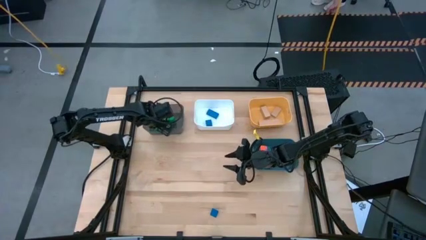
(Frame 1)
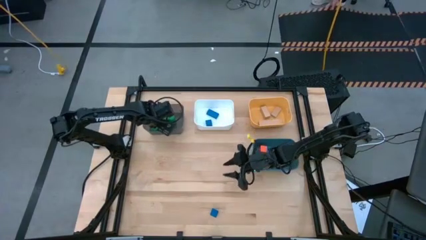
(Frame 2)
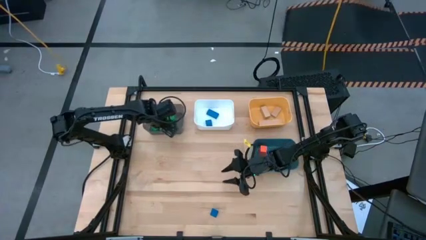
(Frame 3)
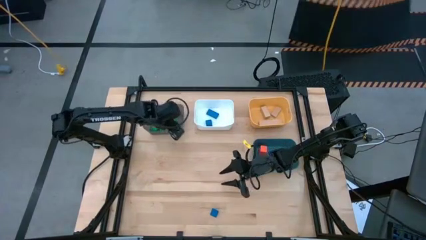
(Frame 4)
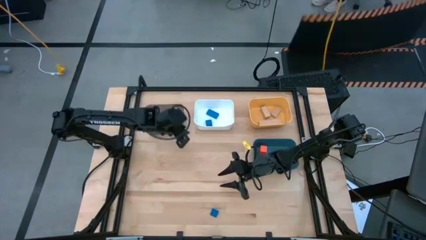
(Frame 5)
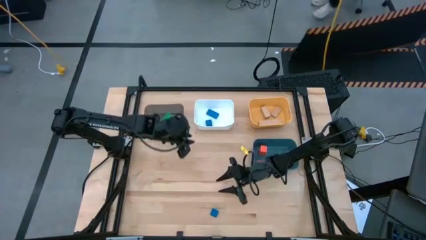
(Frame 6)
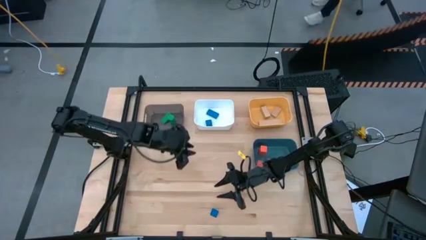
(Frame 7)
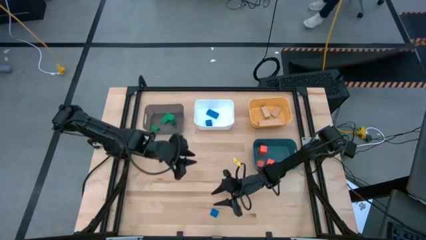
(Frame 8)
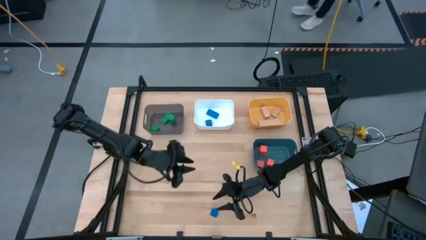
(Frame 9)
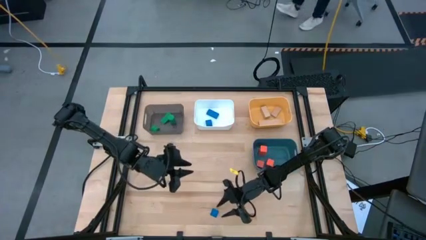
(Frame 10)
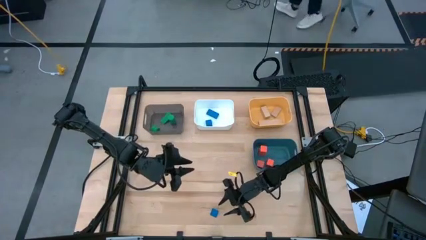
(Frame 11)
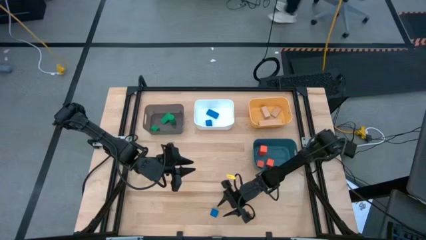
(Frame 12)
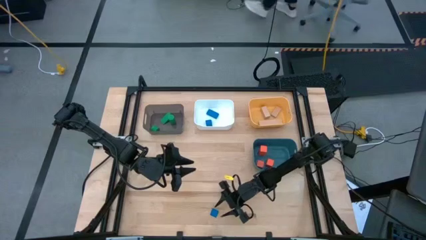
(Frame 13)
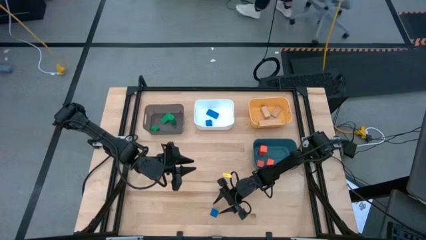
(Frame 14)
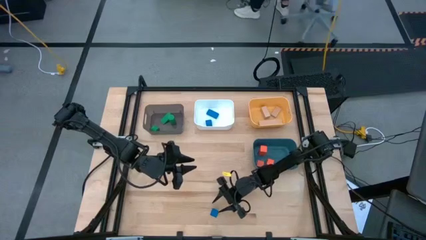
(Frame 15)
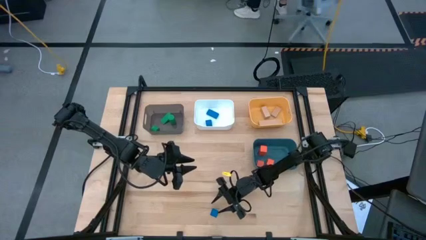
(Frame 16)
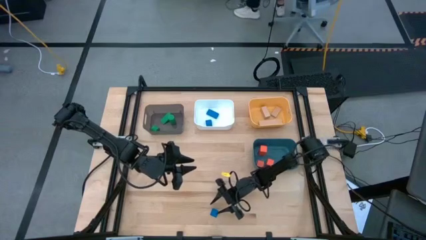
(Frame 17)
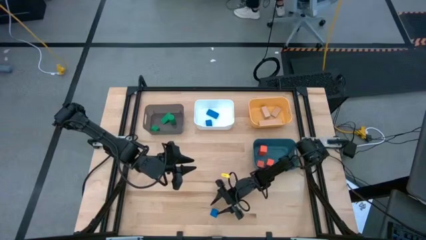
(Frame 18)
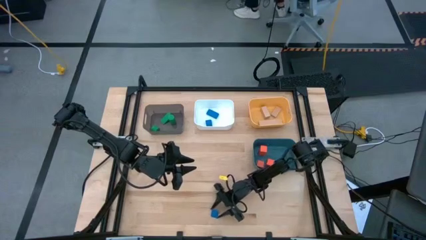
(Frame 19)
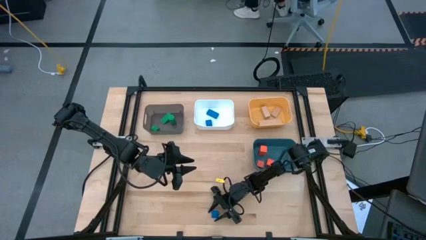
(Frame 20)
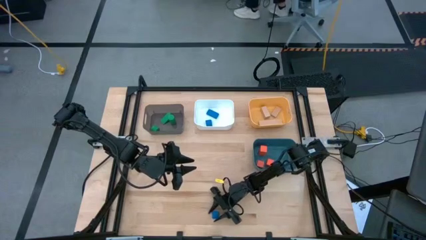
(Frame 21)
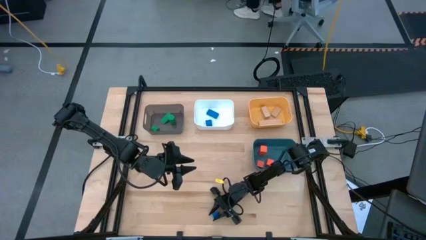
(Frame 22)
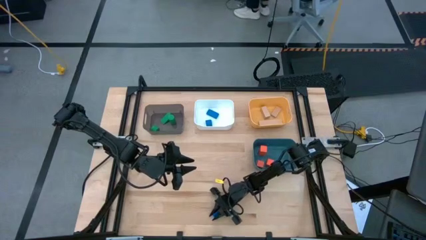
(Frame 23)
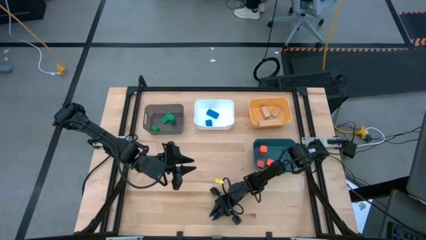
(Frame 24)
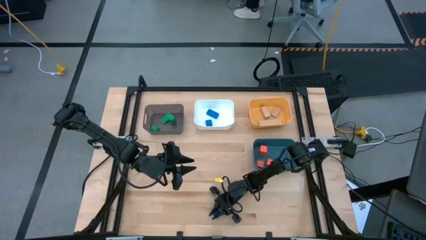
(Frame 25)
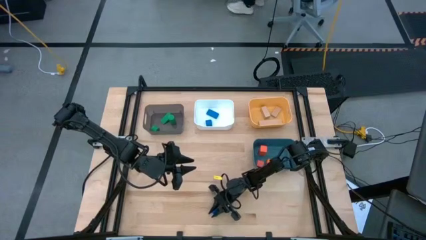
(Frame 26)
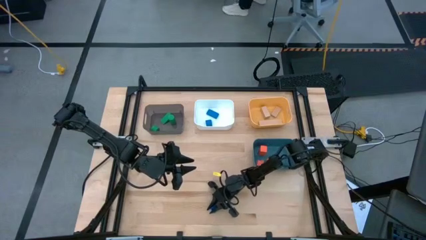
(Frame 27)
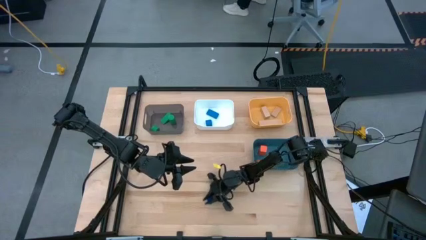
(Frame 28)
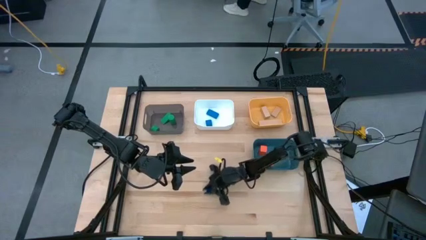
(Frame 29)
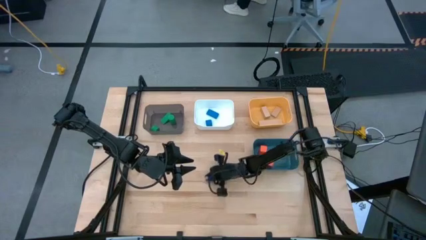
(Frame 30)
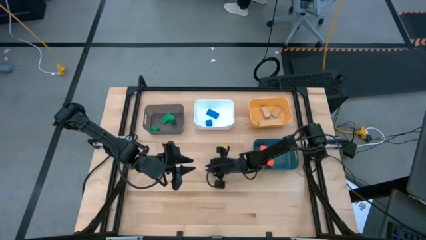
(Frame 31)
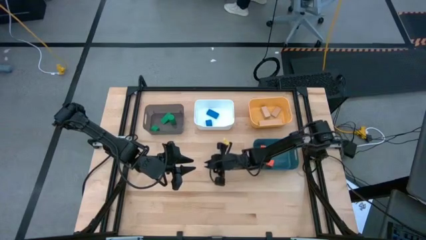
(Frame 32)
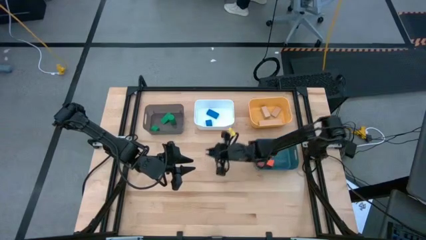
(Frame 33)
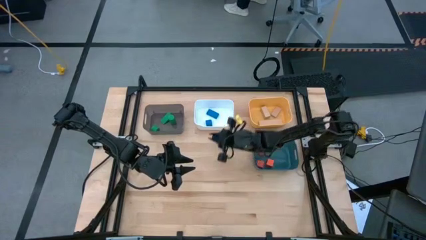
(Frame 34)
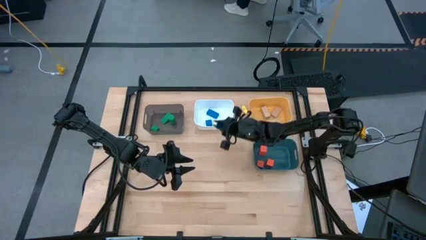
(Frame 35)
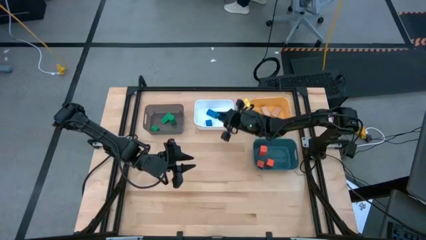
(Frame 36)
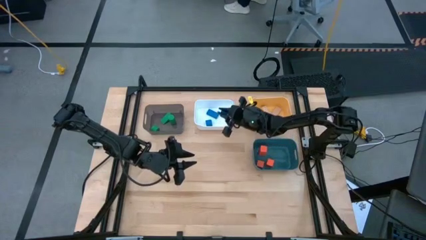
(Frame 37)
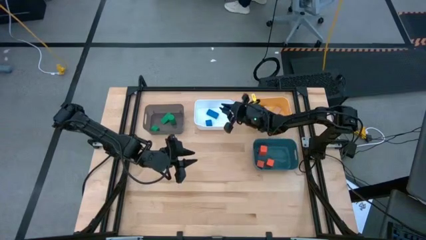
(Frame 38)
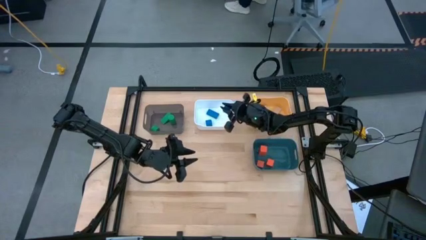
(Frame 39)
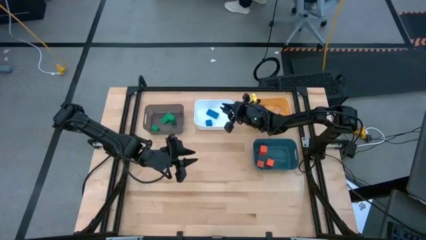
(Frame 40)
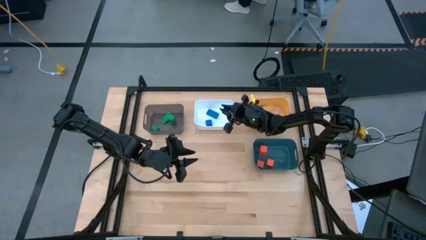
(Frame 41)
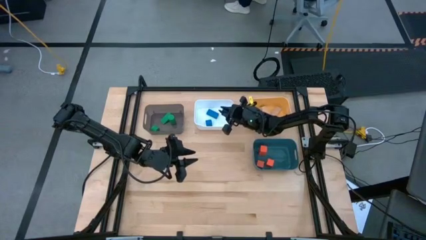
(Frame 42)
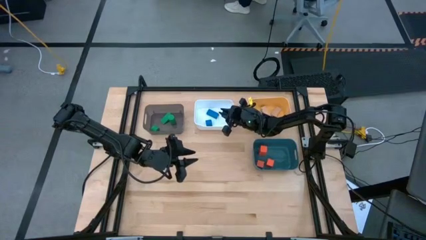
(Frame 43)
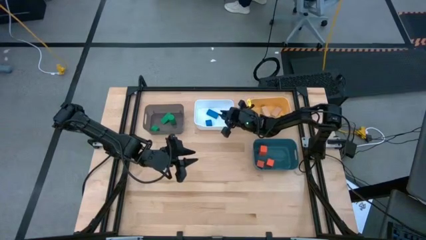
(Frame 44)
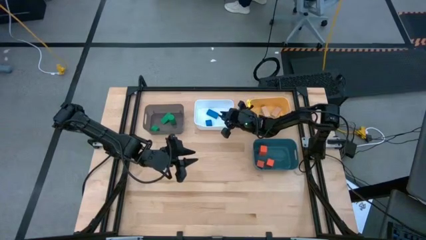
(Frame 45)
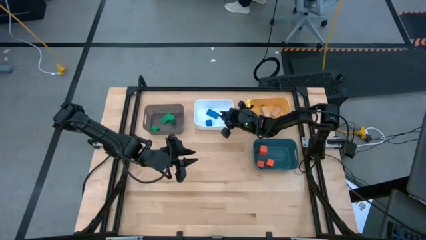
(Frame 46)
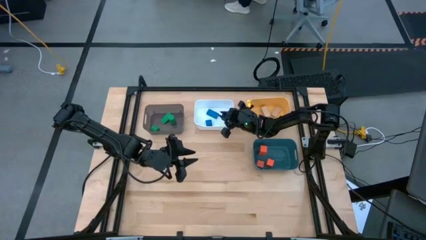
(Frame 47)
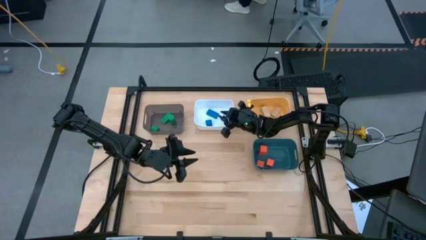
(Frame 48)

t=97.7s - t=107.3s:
Task: Sort & place blocks by color
Put the blue block into the white bin

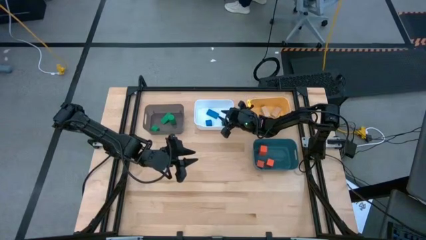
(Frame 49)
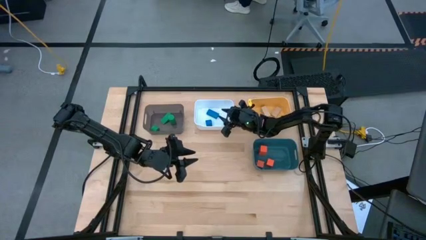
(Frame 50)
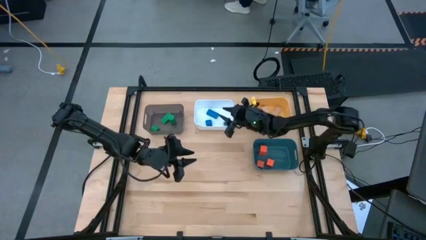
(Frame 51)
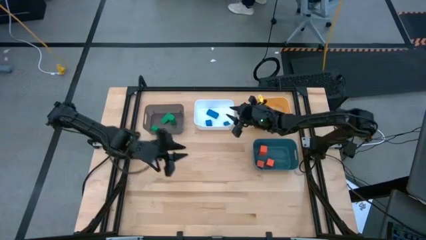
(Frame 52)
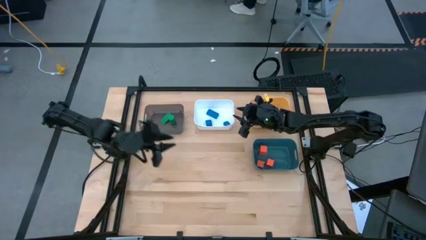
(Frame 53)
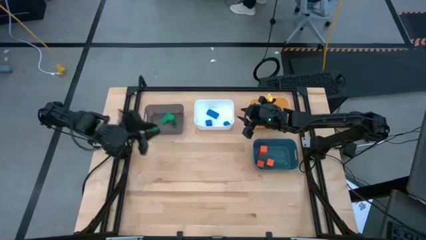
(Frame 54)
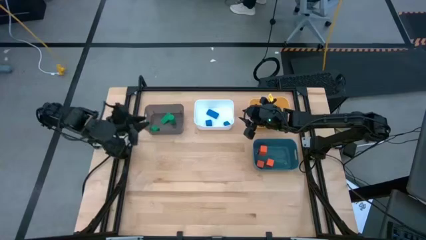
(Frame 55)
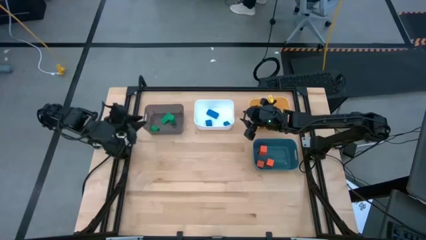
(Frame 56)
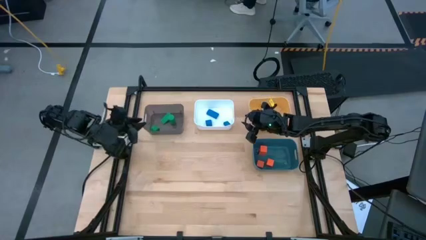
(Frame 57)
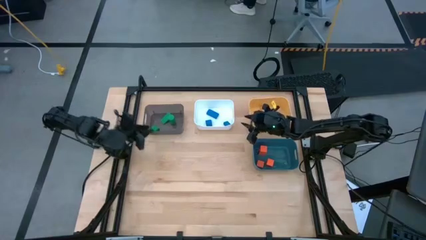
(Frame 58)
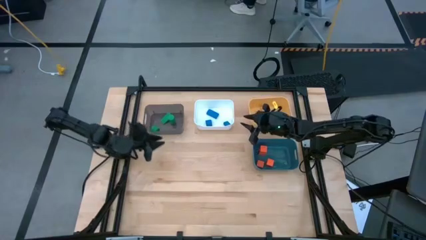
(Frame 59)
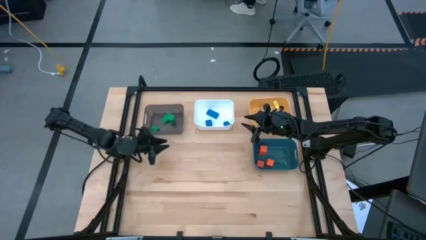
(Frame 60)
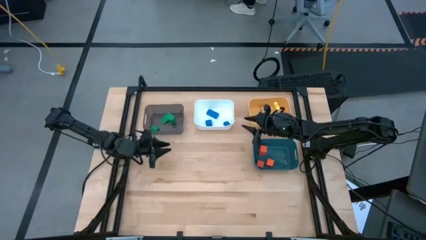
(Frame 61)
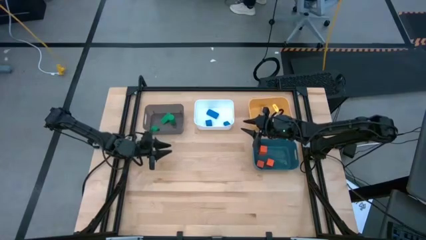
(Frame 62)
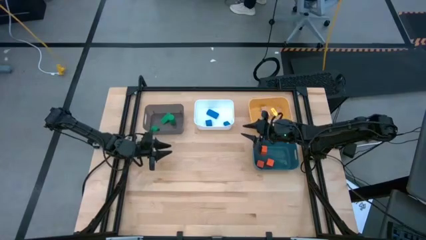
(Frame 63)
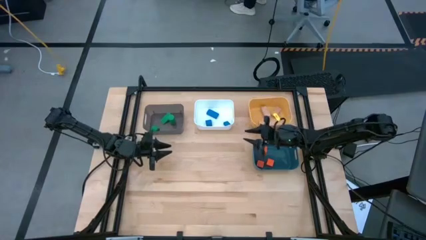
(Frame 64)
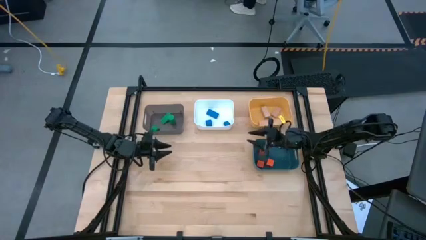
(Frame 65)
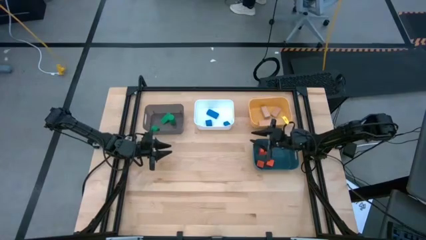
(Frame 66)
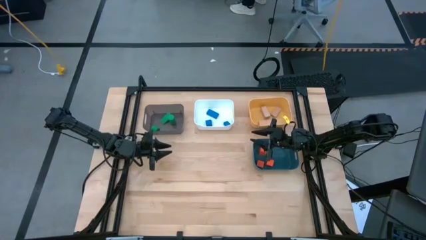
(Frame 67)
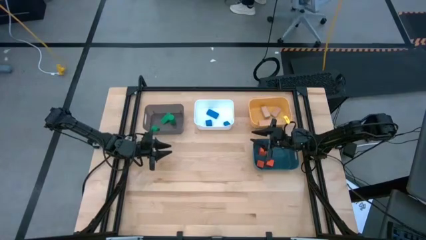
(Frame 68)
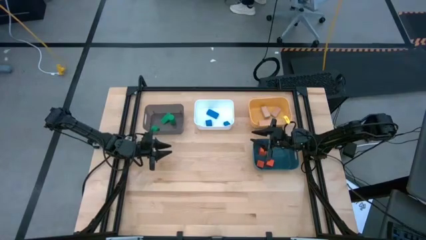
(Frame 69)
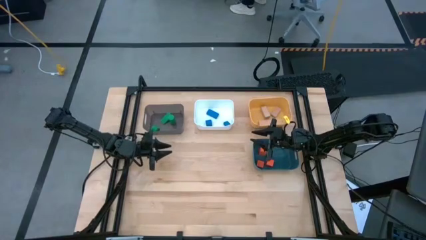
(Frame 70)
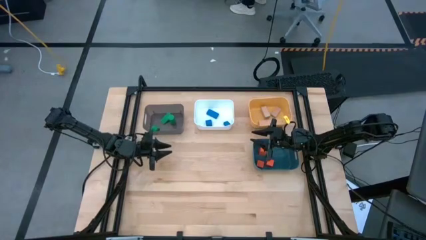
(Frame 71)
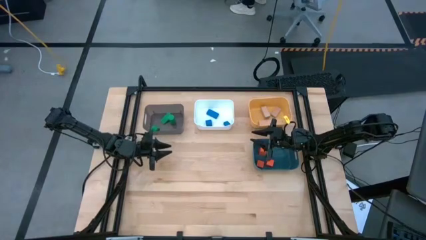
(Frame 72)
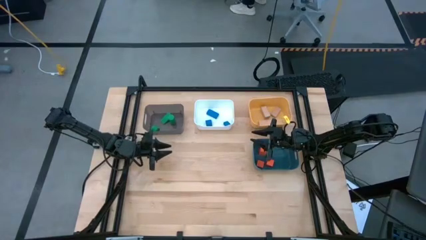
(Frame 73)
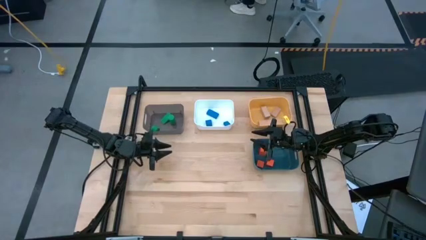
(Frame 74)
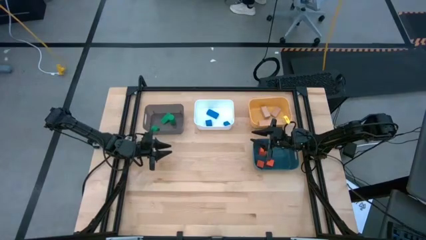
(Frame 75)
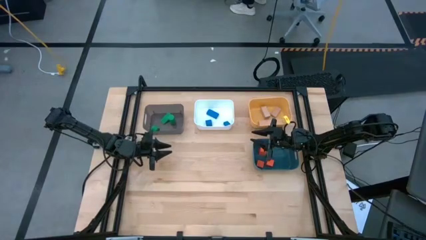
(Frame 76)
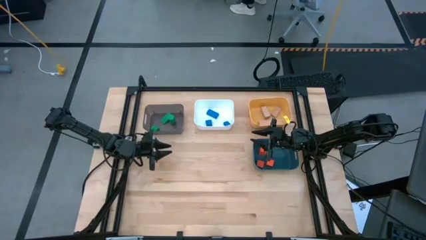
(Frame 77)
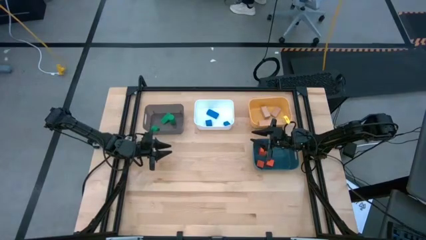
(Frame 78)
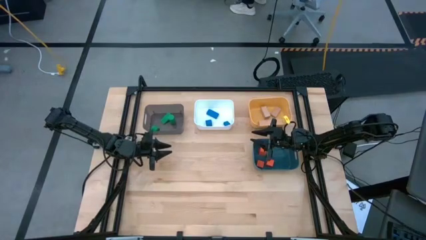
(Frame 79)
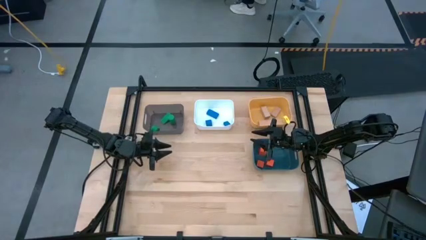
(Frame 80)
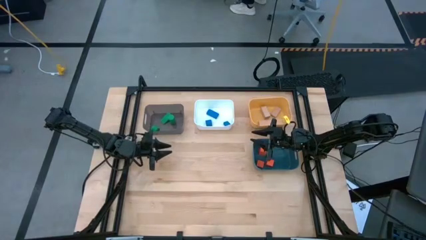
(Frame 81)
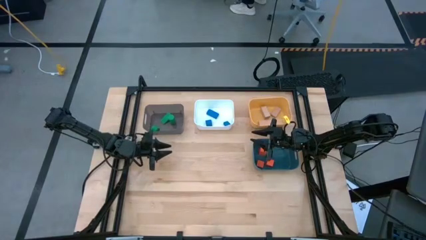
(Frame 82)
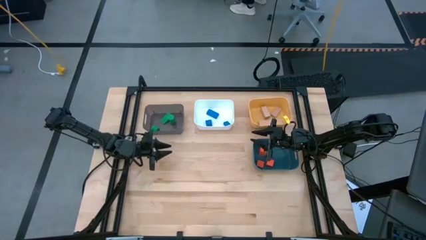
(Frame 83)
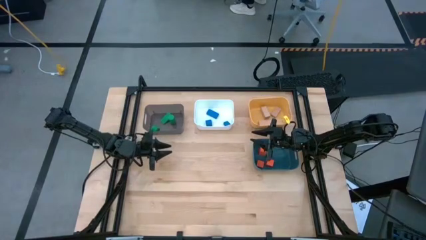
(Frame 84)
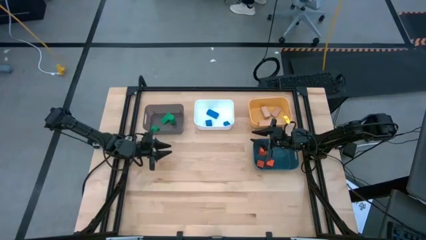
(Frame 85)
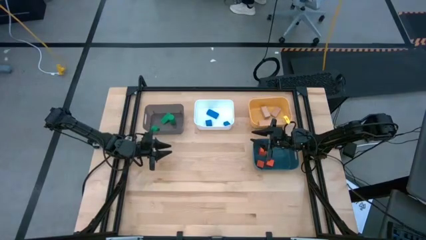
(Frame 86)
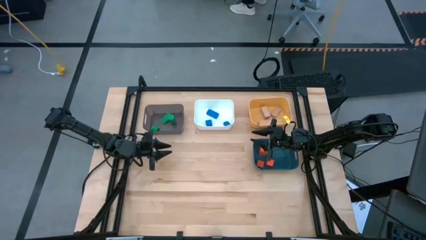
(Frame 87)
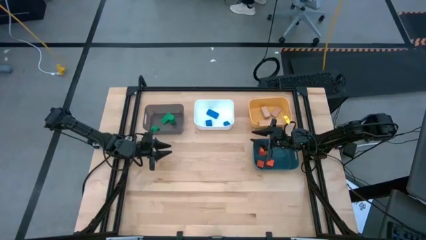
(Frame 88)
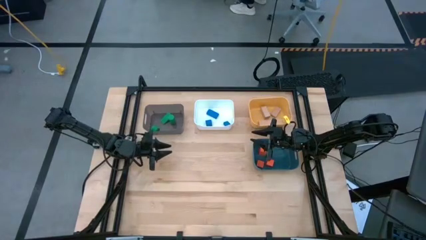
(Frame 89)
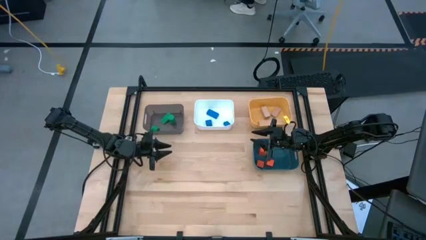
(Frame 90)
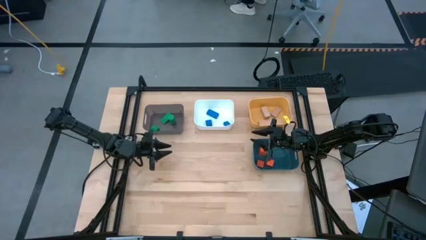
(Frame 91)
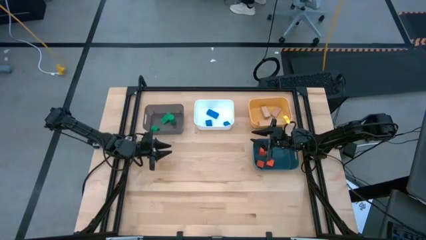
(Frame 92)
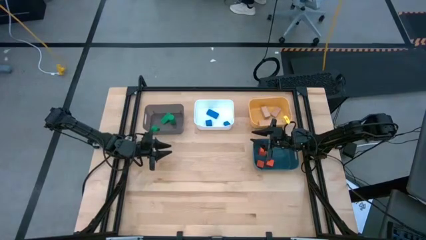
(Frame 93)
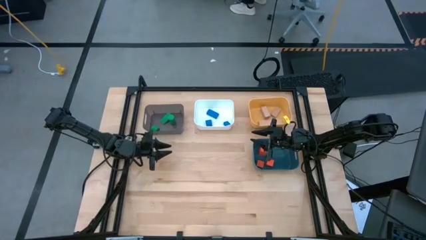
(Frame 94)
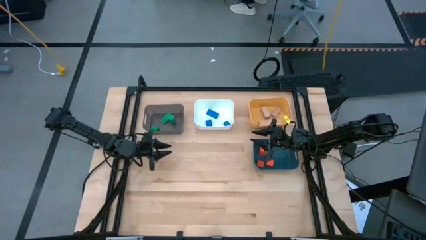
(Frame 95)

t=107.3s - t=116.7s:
Return to Home Position
